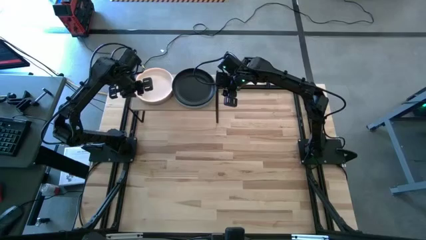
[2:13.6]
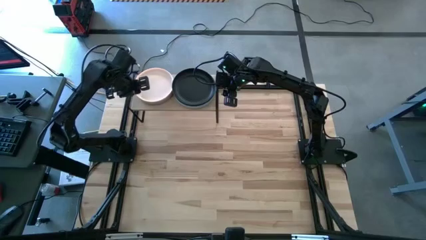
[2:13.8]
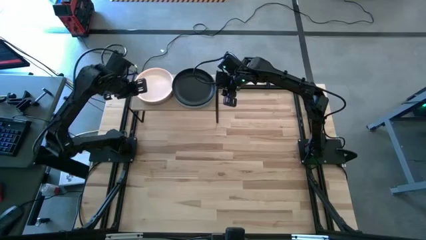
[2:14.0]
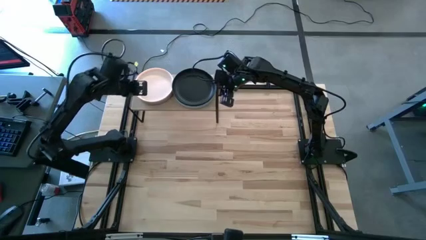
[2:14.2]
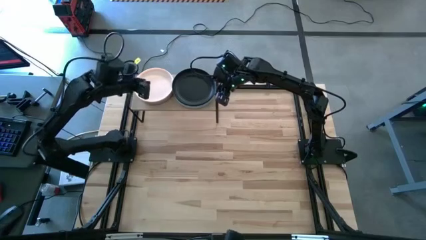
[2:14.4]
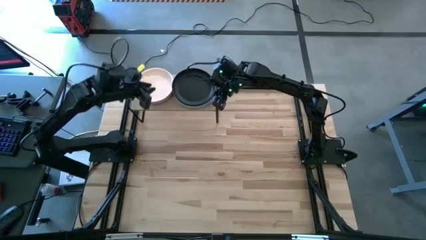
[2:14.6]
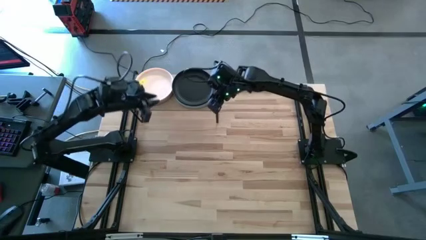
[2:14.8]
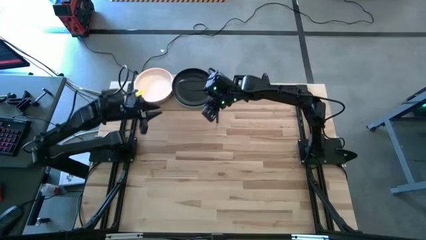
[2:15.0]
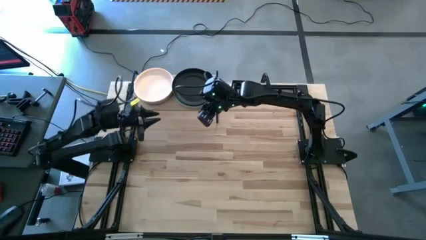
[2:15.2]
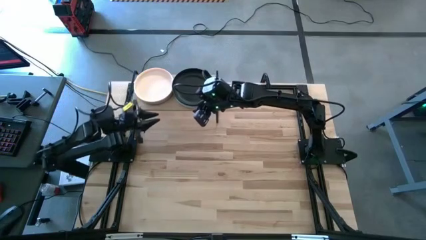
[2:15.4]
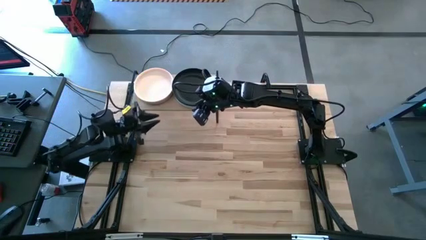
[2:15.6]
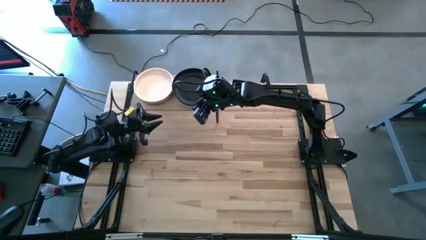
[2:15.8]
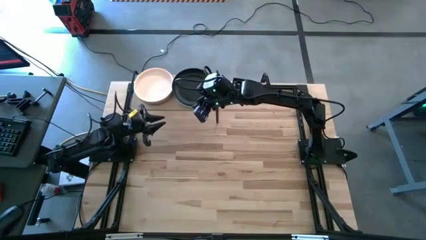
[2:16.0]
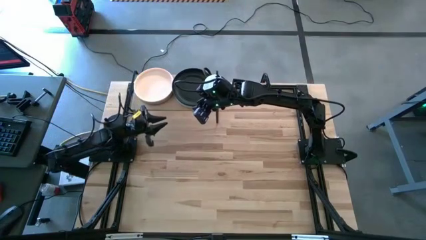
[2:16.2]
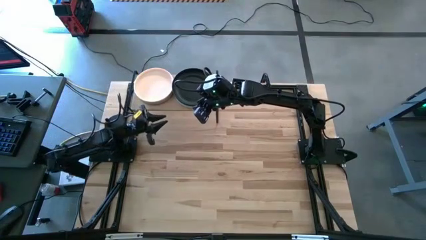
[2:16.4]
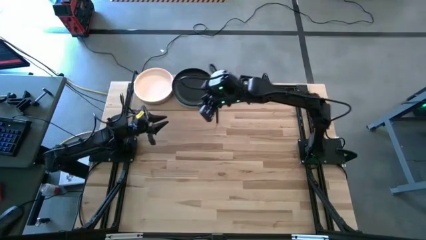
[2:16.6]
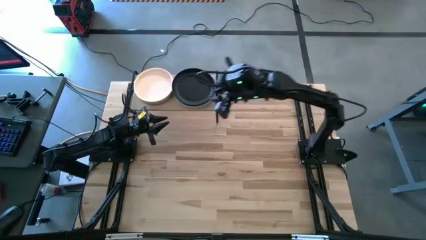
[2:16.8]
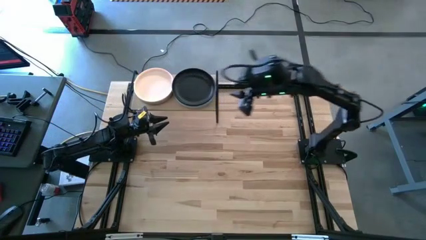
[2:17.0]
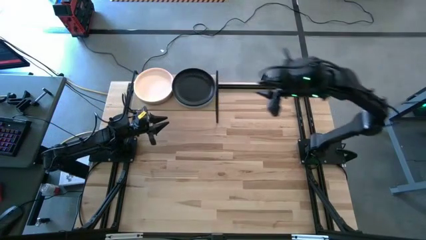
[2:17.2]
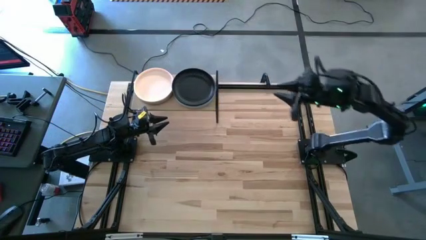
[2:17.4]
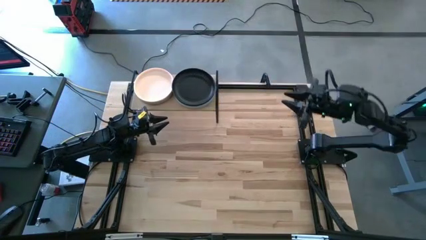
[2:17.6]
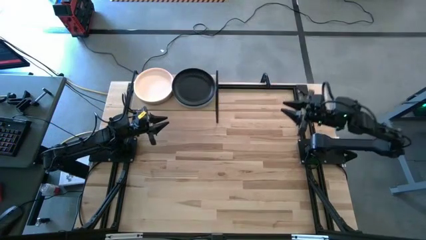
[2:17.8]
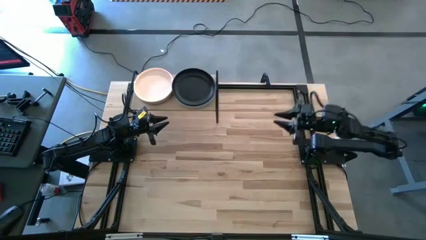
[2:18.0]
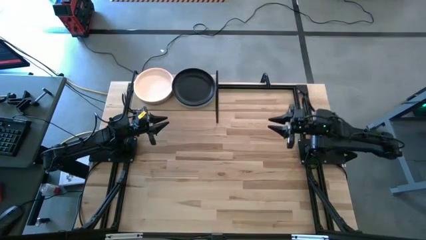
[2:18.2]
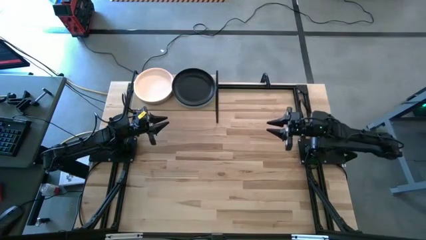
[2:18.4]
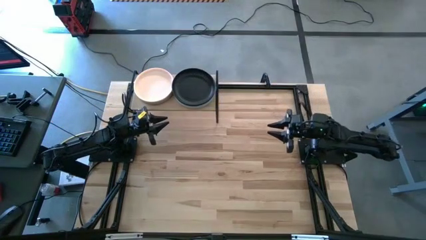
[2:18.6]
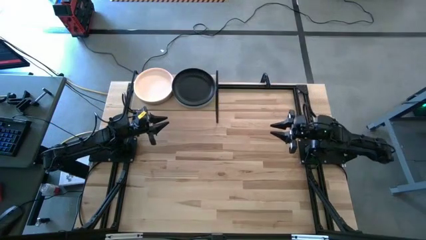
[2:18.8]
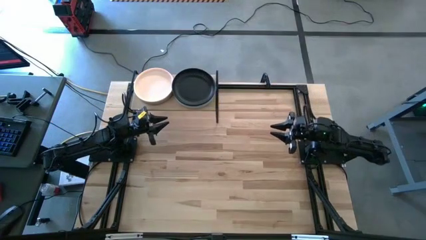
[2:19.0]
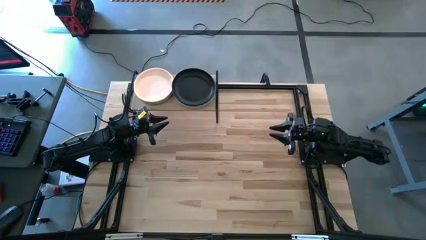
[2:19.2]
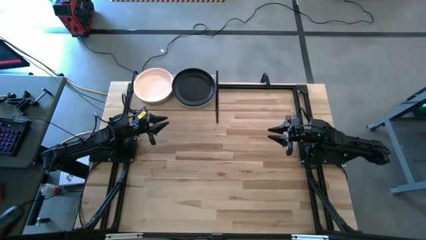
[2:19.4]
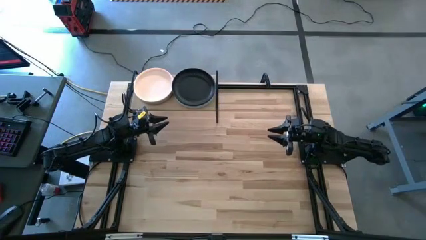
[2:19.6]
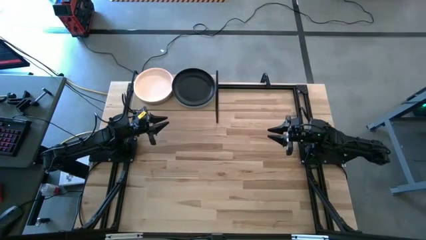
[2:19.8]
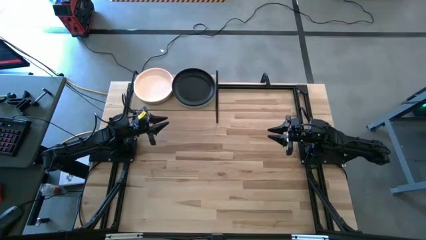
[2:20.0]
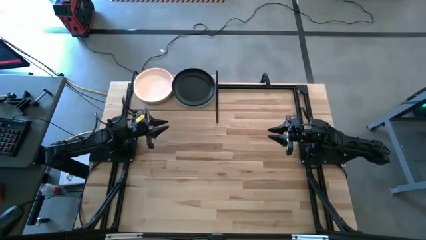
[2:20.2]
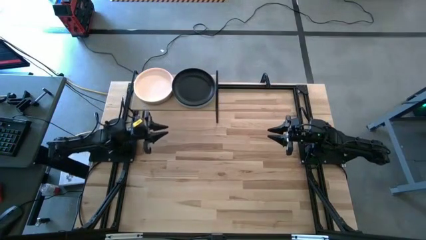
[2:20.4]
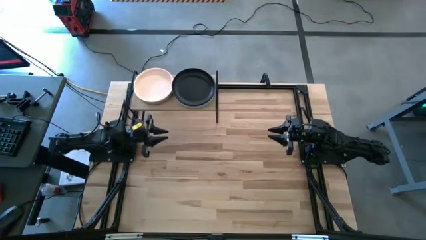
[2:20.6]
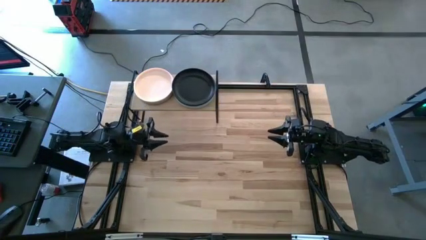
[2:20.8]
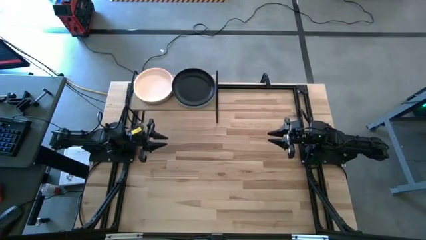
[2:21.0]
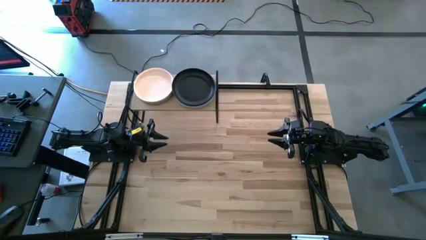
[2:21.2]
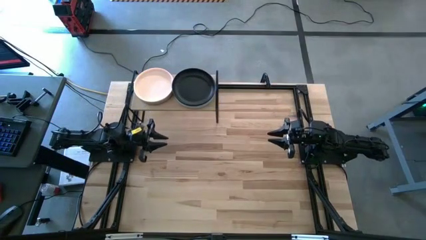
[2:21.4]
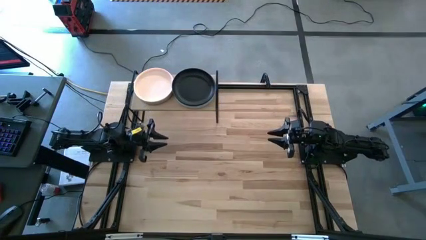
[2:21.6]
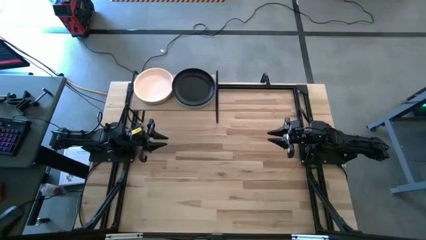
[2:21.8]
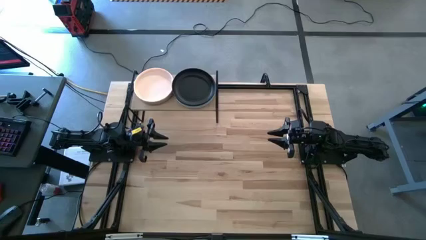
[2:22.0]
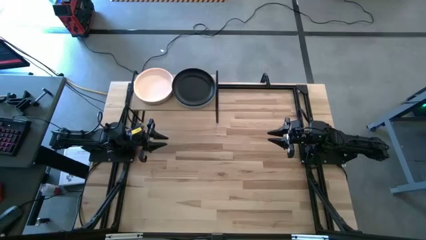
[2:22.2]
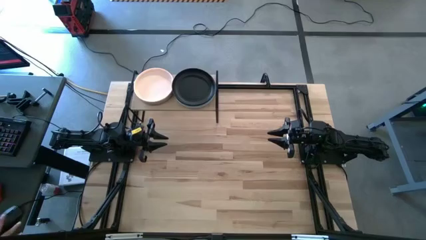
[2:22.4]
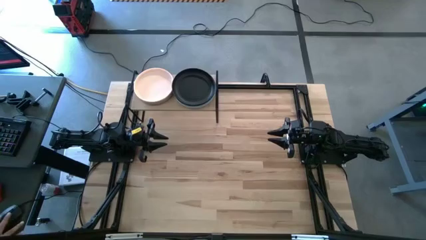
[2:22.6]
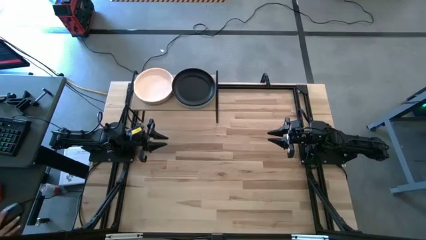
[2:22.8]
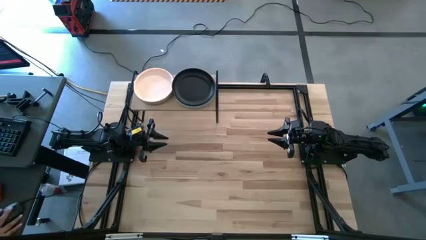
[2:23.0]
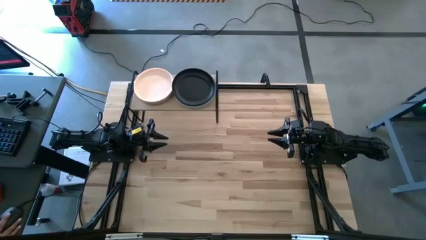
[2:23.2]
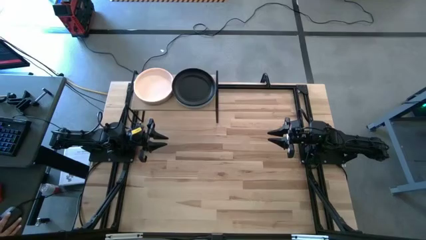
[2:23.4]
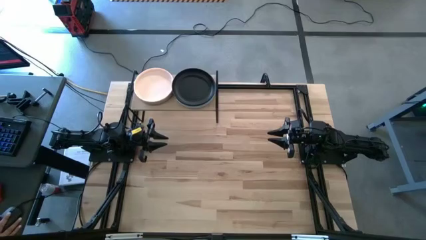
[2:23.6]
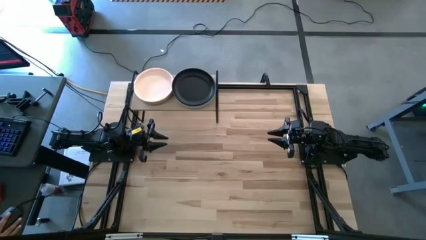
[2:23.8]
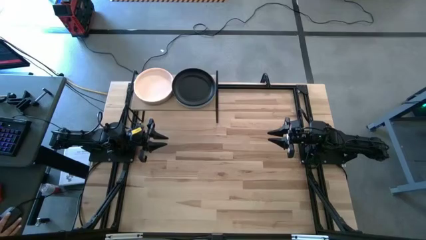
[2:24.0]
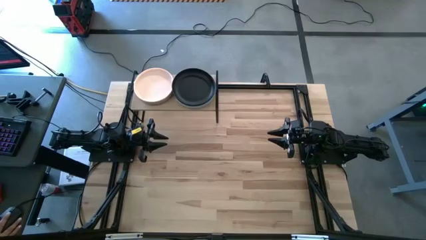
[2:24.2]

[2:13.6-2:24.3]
Task: Place and stack plates onto a shelf
Return to Home Position

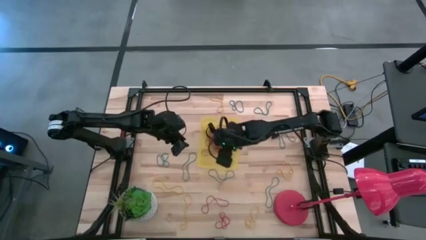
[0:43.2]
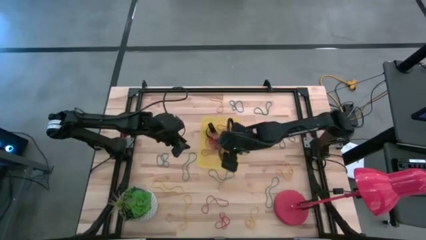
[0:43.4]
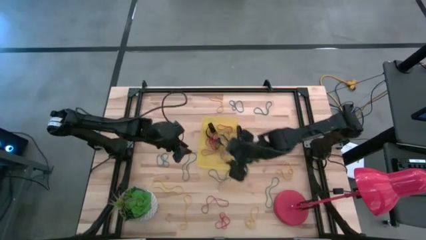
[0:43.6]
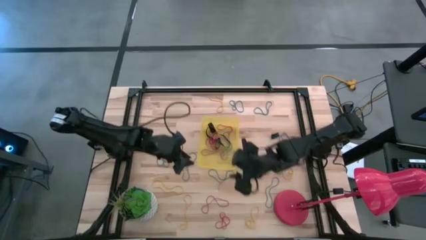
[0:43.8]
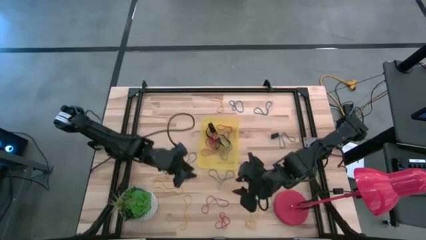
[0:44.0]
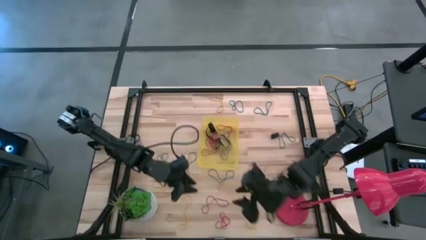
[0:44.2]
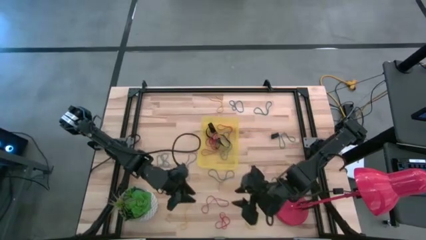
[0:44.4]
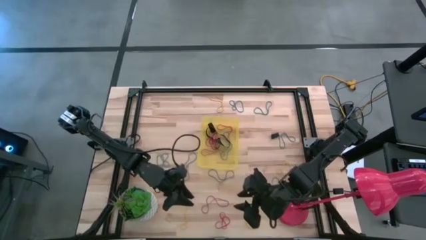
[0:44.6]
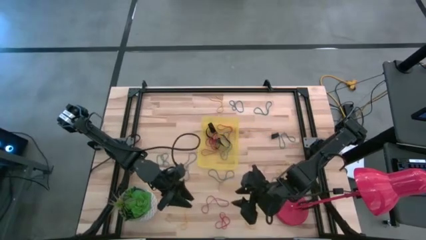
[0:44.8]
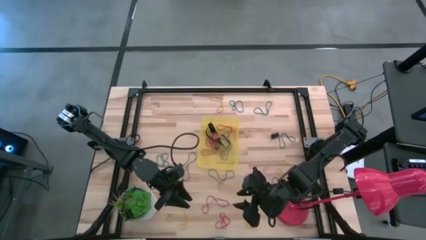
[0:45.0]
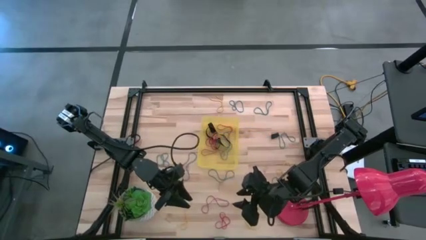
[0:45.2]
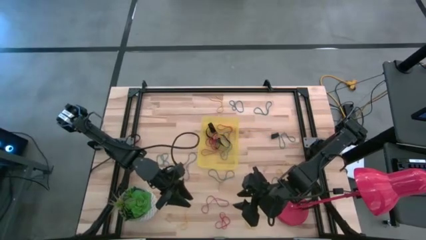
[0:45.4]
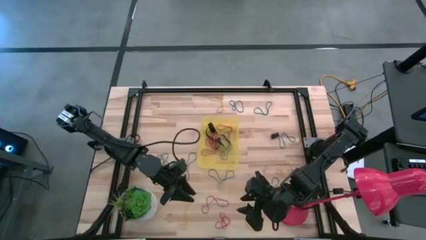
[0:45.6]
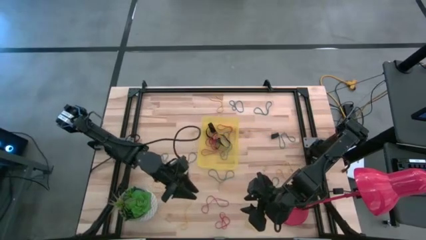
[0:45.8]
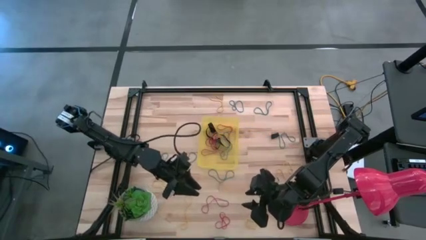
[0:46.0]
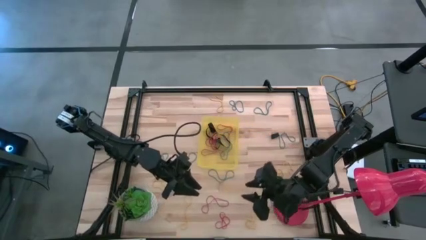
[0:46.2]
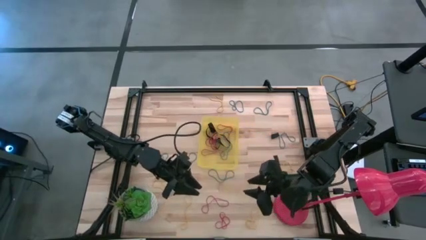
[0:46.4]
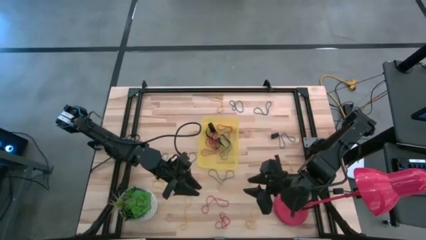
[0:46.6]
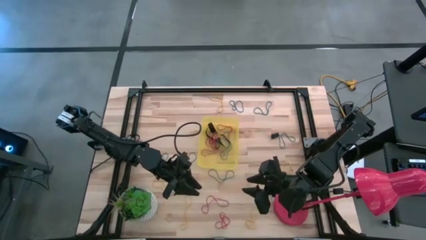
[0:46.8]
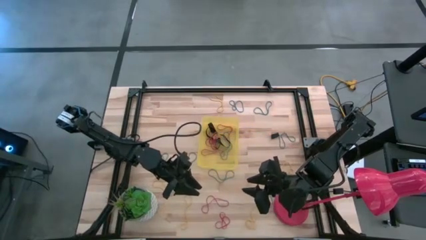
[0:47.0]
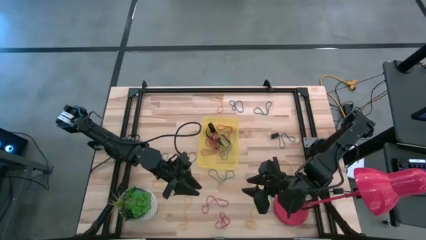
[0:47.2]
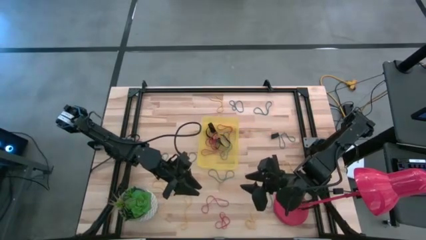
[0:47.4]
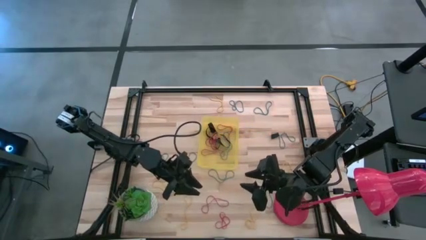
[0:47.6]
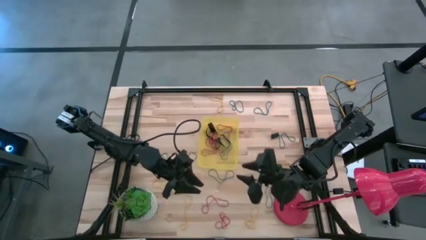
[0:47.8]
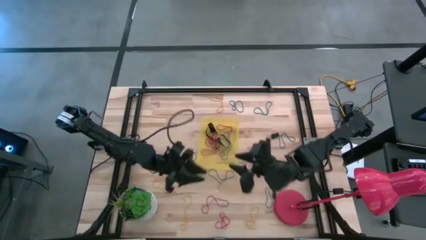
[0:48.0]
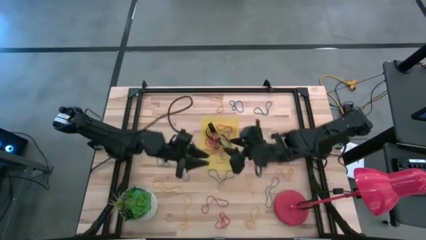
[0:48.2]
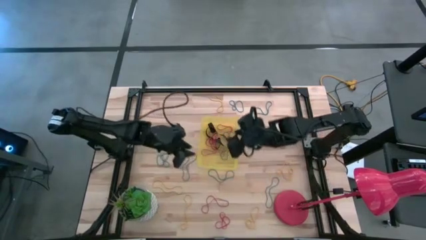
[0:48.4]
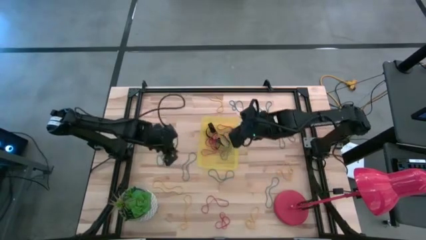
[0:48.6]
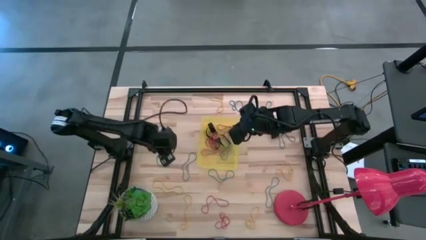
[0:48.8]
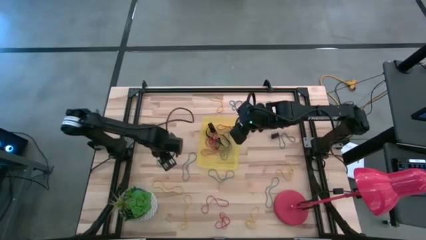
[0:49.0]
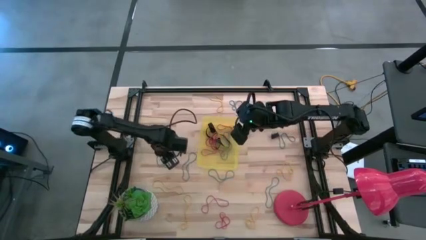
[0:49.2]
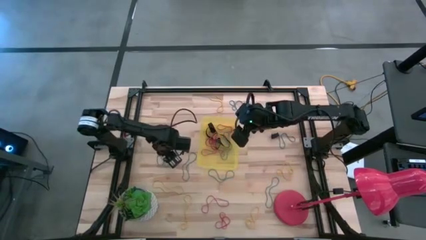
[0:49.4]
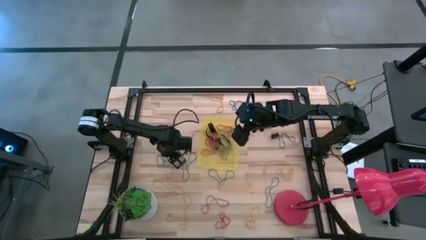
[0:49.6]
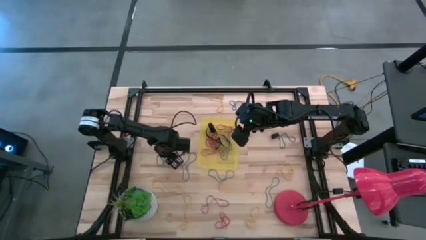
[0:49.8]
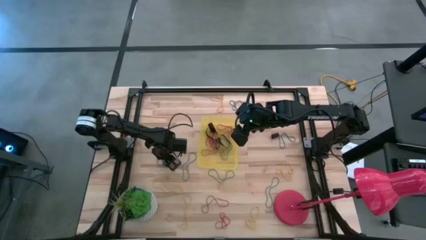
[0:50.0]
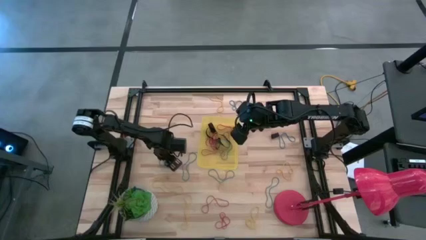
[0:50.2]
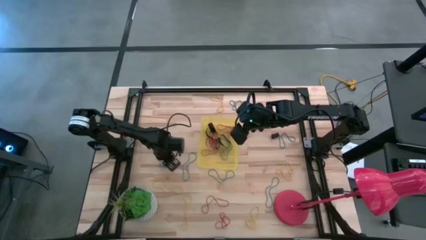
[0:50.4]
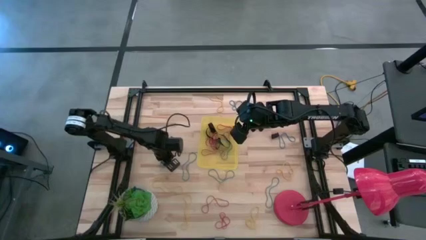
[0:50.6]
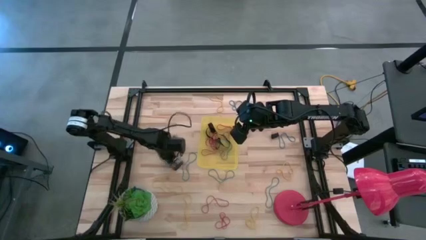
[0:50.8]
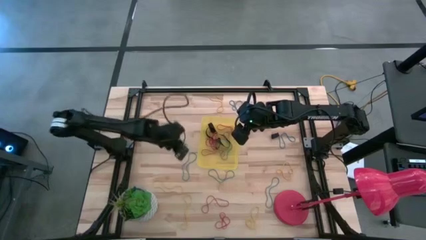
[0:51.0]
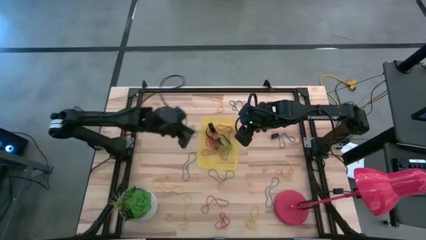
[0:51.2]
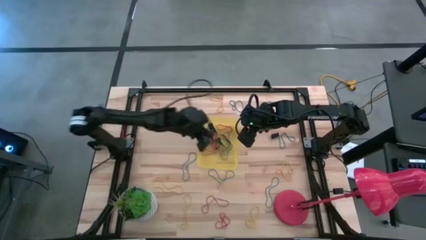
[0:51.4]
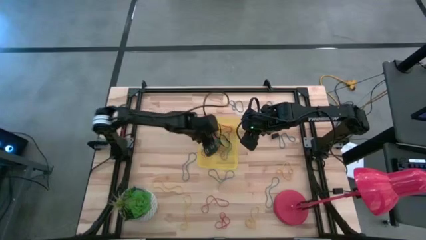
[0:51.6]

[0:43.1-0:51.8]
Task: Pick and place rubber bands into bin
Put the blue rubber band into the yellow bin
